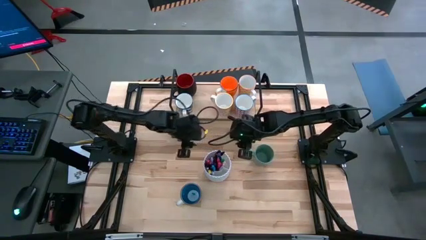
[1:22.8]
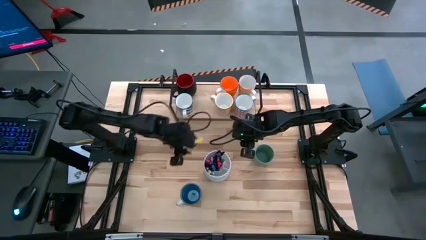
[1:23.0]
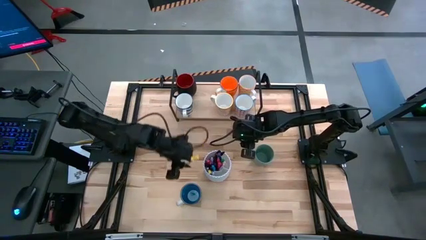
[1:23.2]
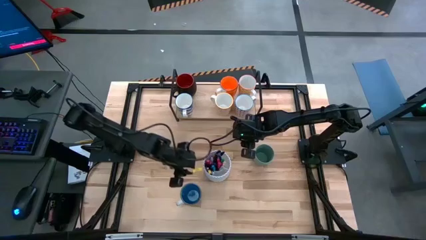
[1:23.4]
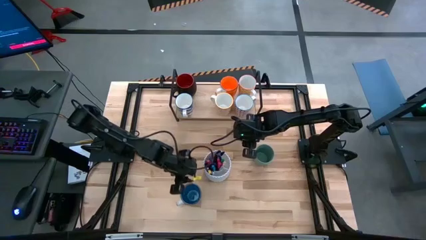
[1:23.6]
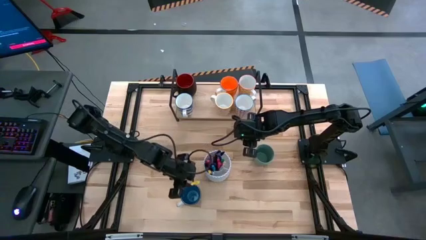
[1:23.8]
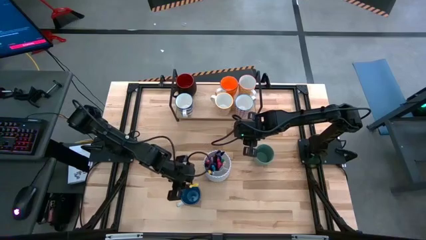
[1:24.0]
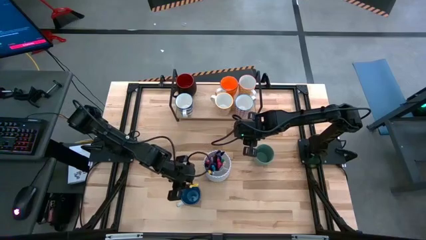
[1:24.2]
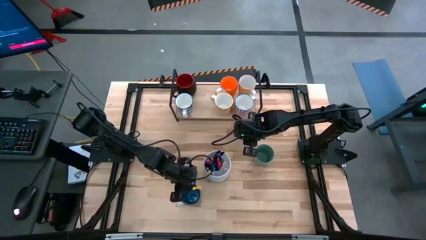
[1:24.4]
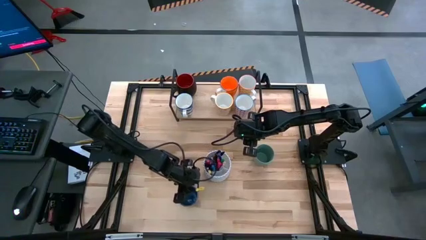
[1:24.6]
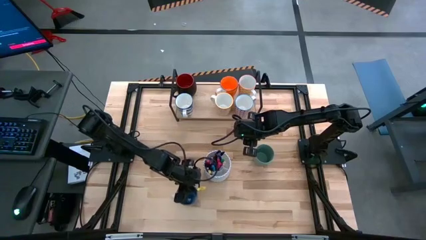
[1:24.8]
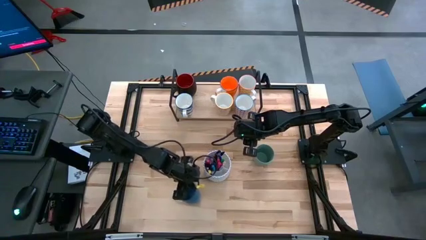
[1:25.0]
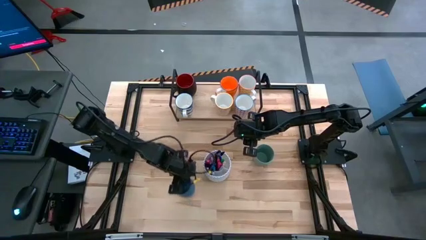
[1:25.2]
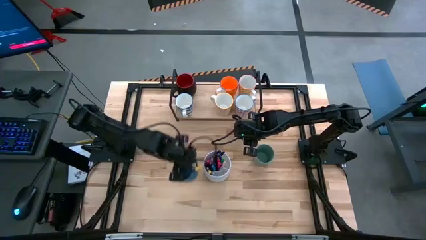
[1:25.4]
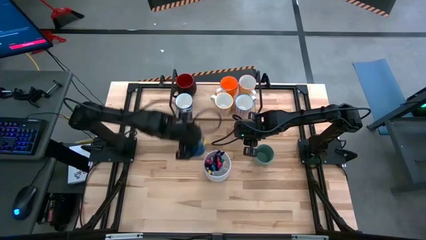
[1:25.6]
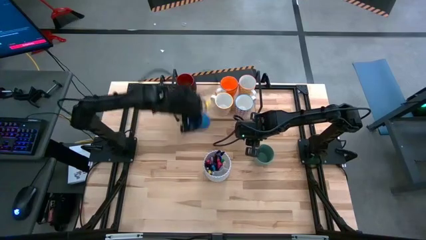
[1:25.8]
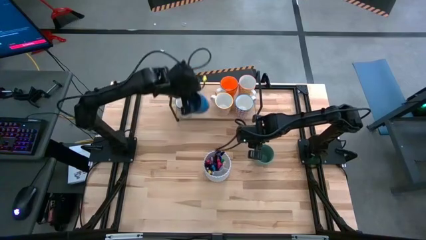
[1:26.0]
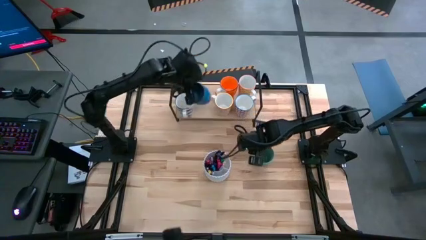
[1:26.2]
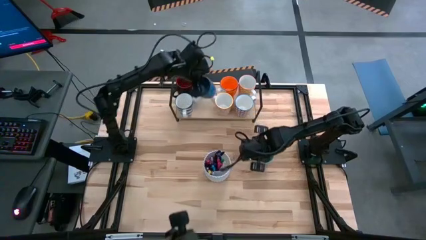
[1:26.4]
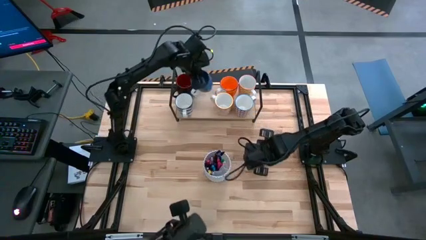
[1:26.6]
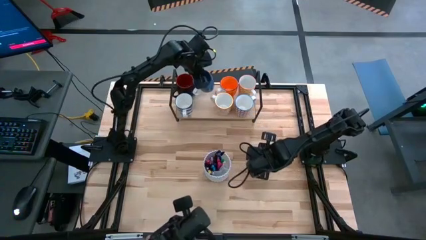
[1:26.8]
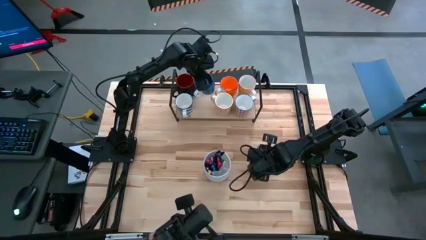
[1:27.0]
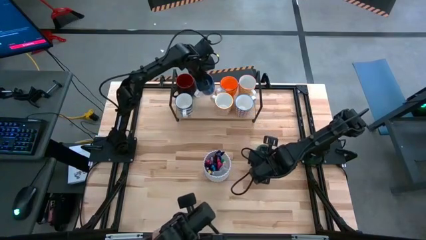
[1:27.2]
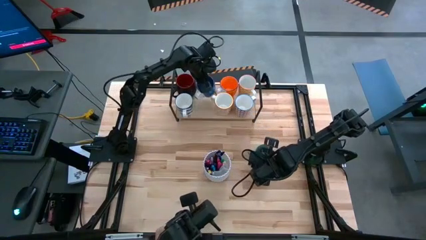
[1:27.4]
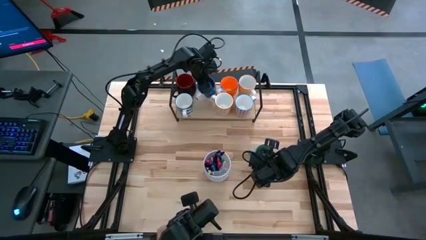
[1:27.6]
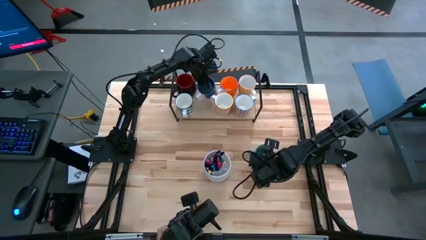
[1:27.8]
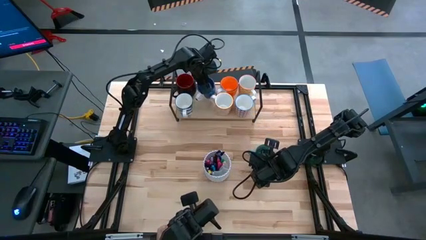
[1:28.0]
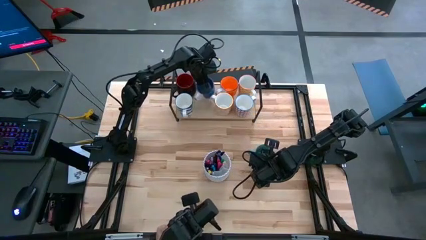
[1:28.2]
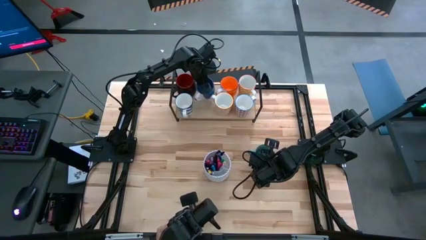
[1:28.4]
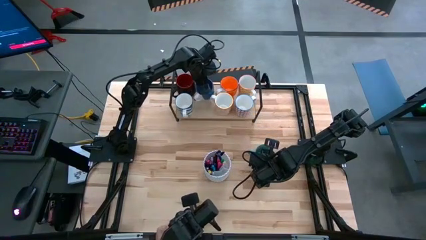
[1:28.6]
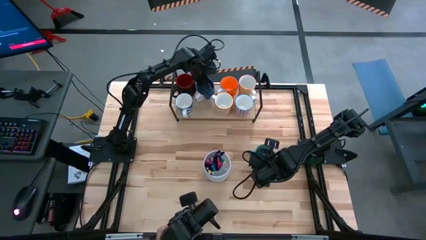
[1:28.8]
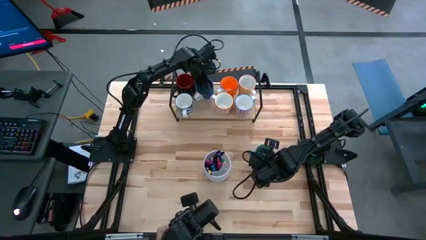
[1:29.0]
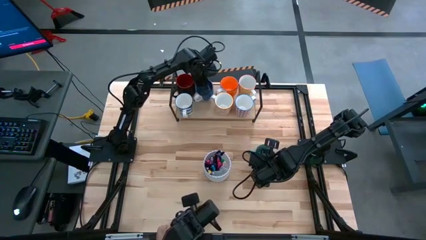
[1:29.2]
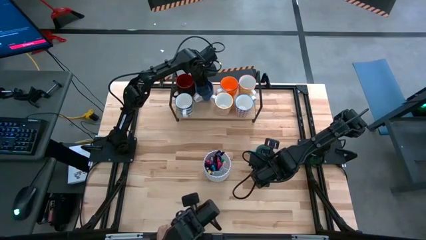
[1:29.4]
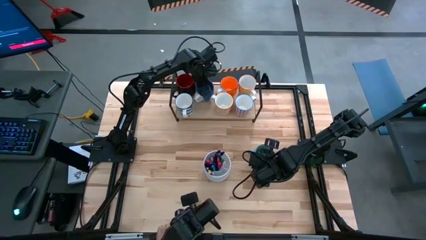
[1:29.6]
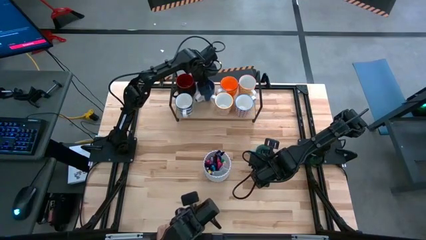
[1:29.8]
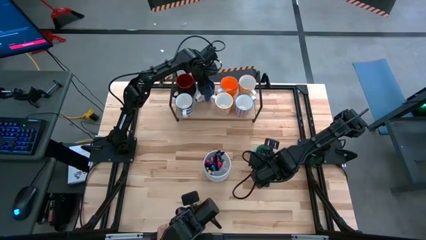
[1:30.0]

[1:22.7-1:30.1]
Task: Place coffee mugs
Put the blue mug on the shelf

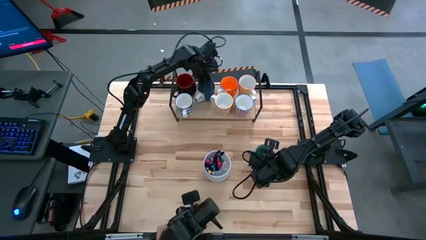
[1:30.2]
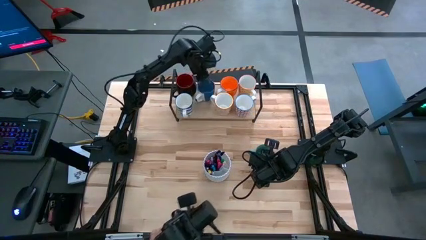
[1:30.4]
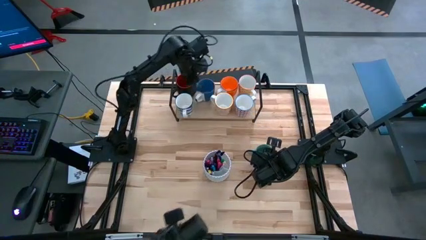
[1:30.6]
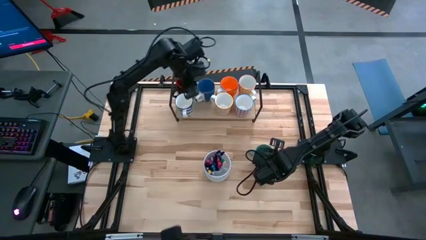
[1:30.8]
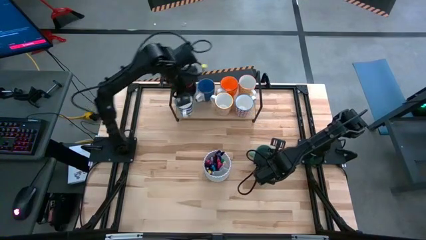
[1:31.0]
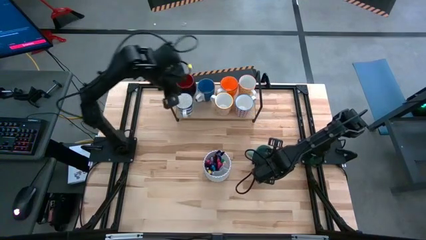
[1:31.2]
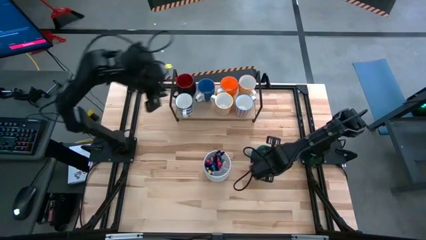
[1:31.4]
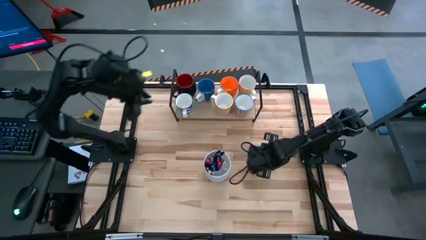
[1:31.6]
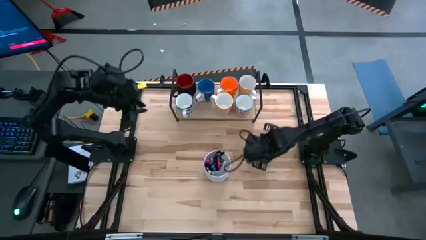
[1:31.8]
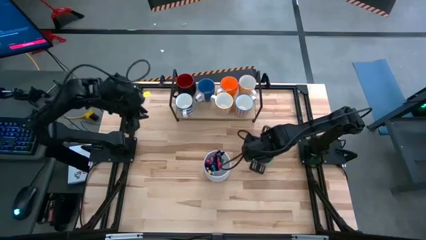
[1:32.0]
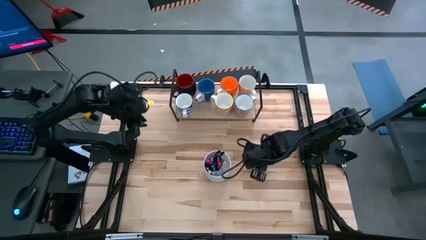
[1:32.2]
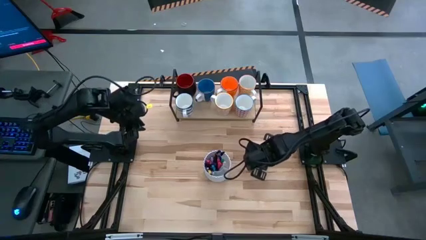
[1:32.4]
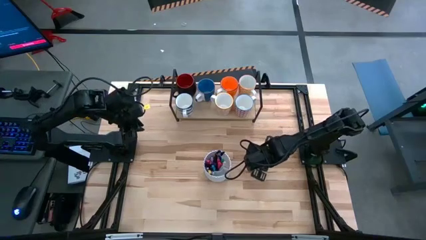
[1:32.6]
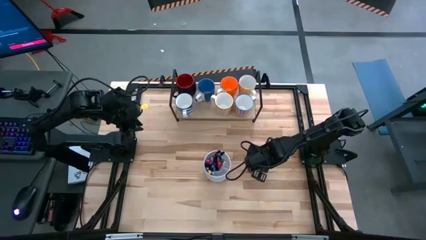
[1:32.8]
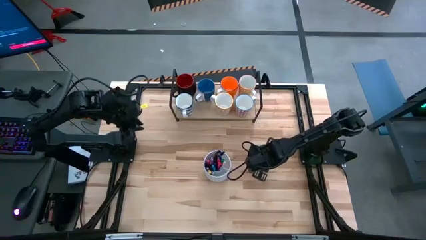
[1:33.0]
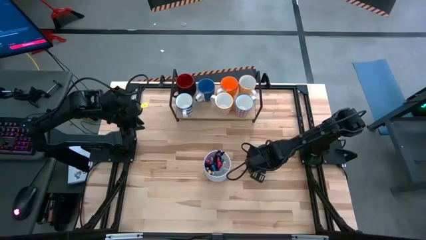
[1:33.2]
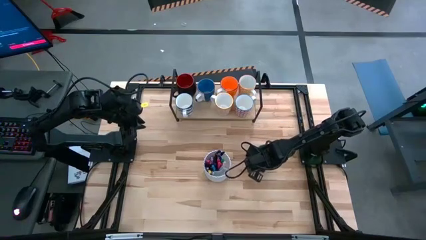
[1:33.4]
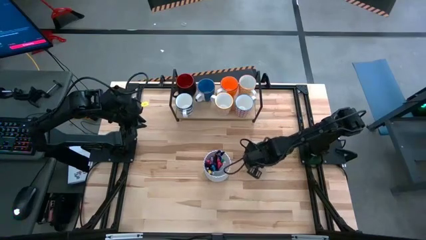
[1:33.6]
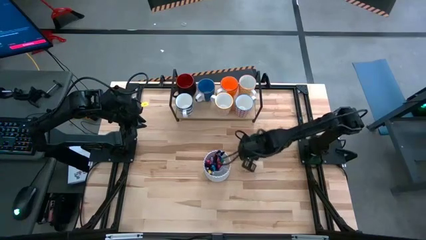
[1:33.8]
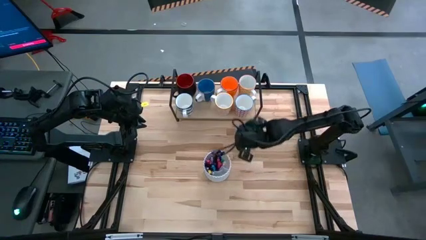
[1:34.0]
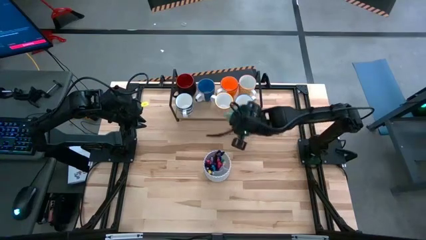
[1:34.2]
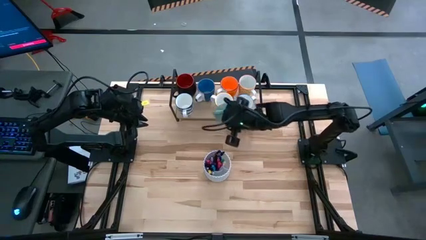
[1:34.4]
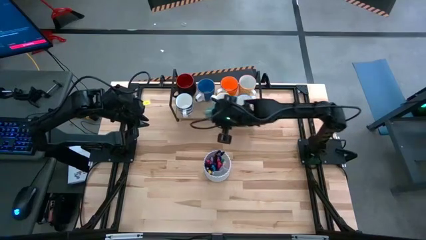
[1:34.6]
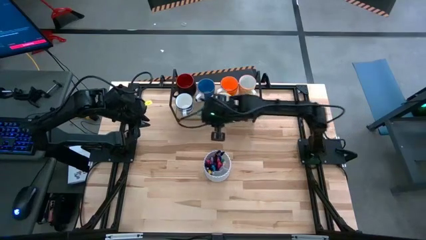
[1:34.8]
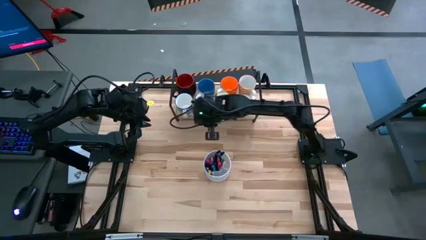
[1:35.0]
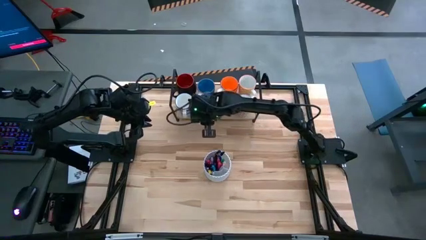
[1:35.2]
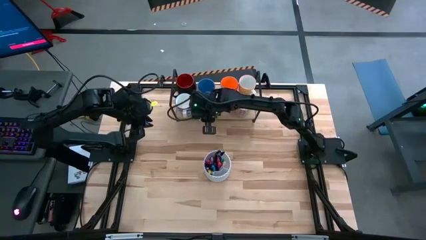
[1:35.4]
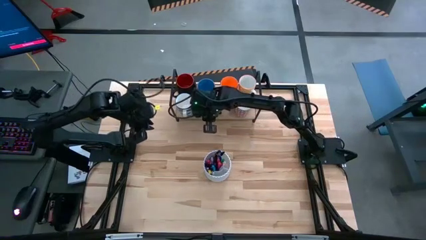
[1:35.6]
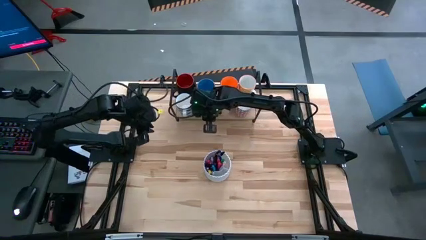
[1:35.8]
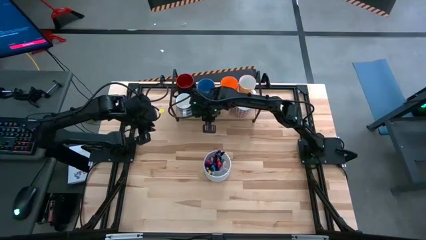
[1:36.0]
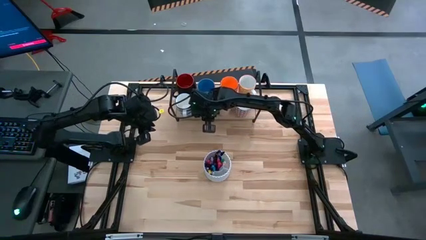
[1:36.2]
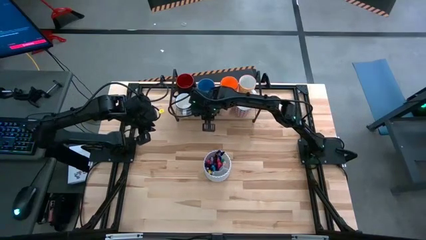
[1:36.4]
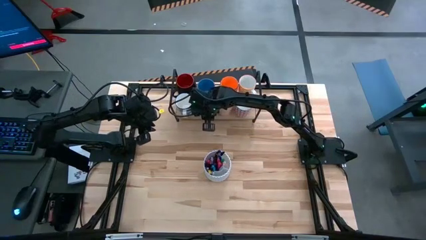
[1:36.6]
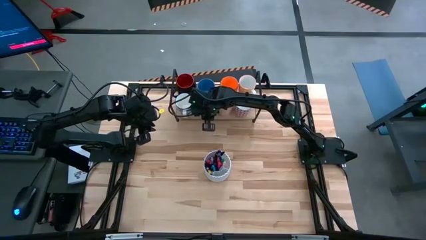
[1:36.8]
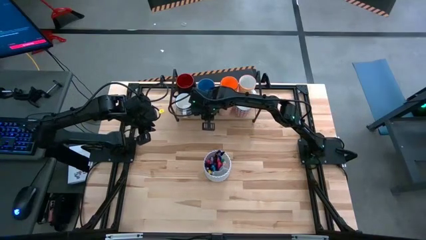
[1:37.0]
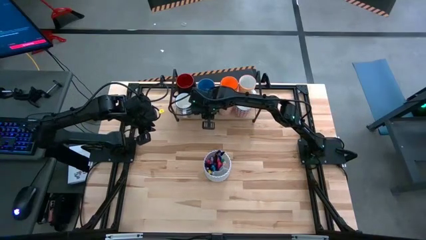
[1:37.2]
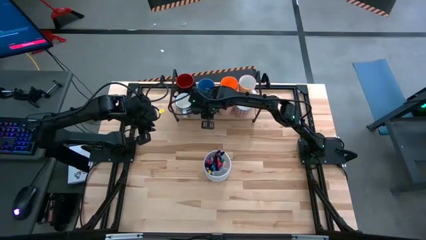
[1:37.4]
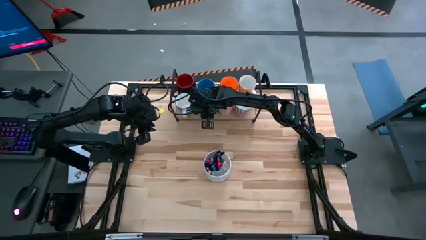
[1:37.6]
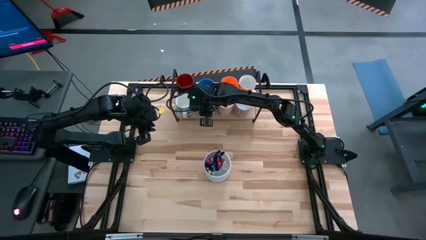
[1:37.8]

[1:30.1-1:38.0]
Put the green mug into the shelf
